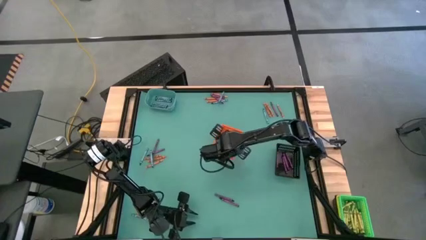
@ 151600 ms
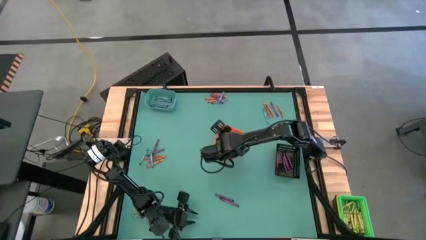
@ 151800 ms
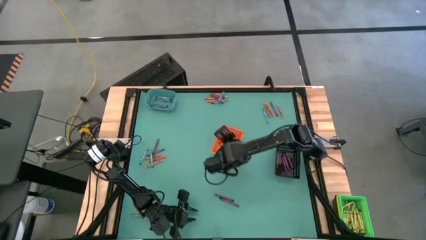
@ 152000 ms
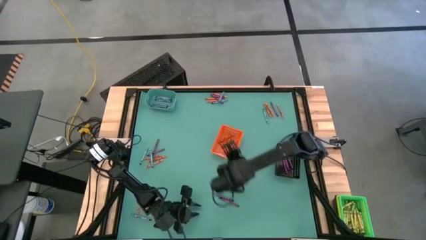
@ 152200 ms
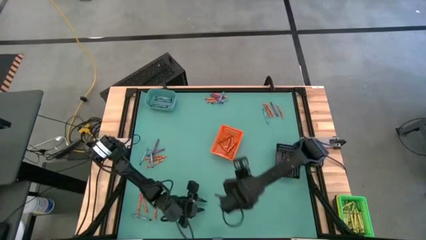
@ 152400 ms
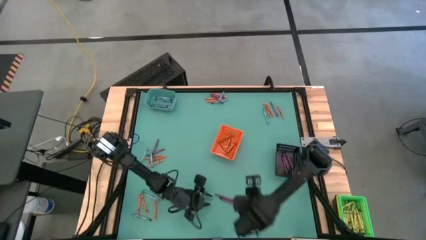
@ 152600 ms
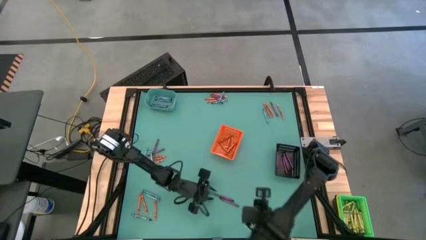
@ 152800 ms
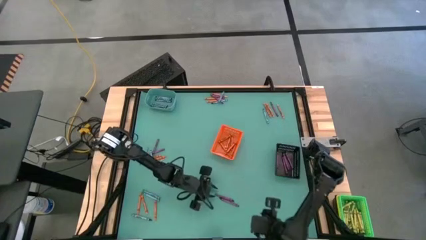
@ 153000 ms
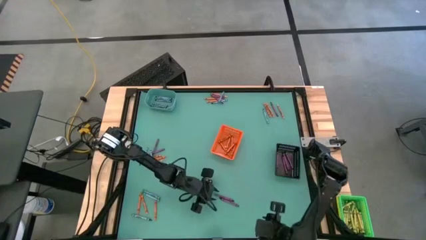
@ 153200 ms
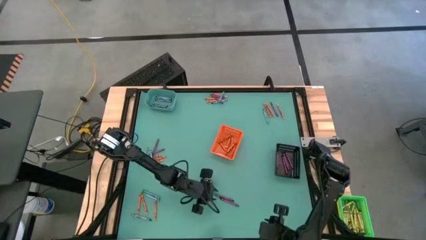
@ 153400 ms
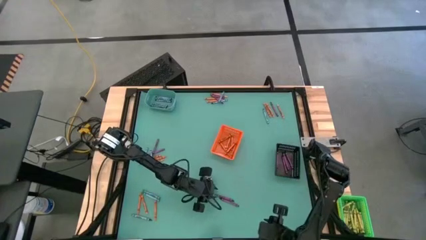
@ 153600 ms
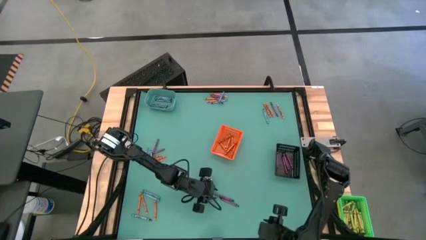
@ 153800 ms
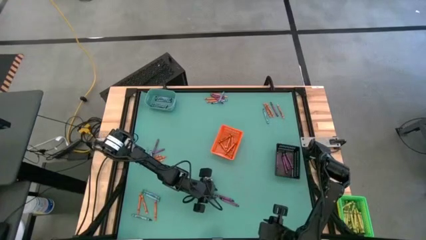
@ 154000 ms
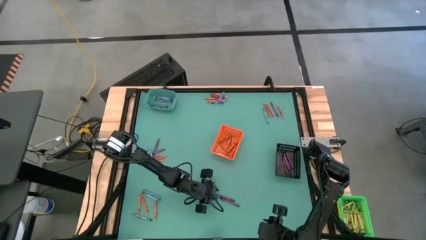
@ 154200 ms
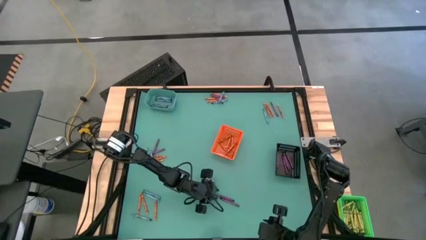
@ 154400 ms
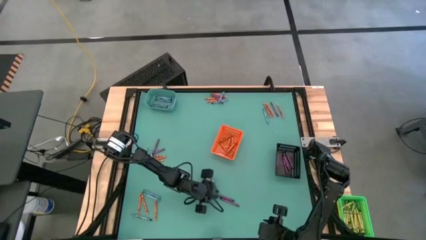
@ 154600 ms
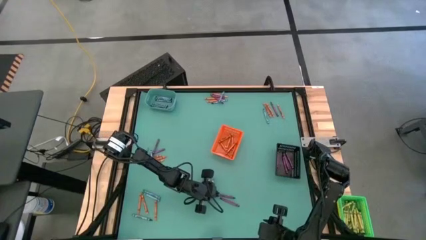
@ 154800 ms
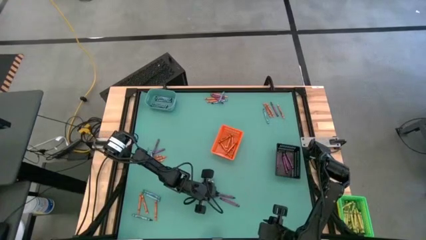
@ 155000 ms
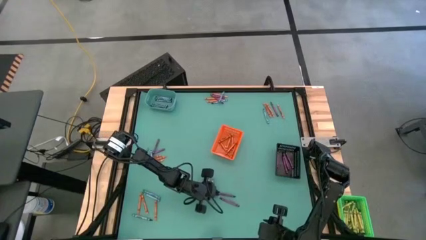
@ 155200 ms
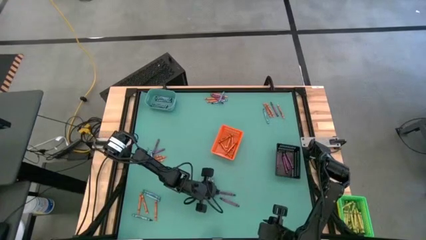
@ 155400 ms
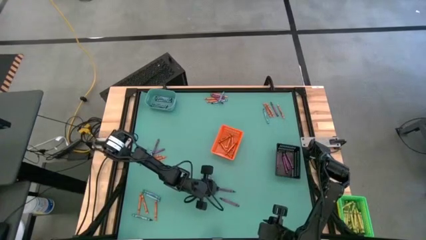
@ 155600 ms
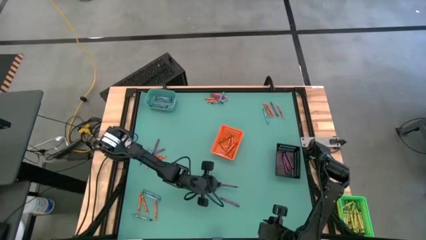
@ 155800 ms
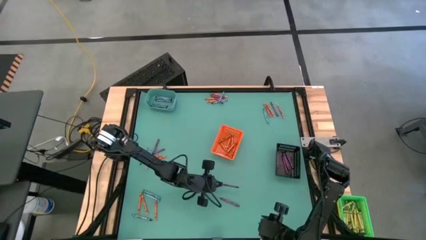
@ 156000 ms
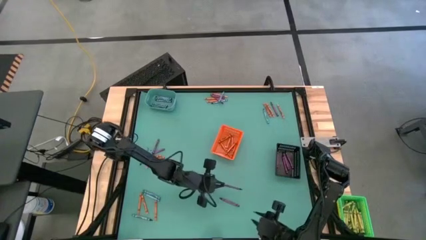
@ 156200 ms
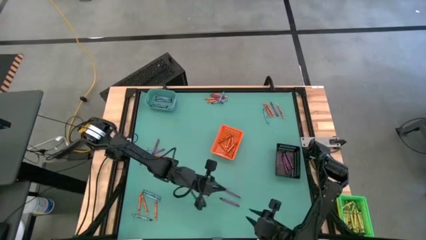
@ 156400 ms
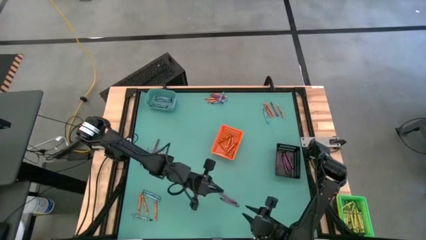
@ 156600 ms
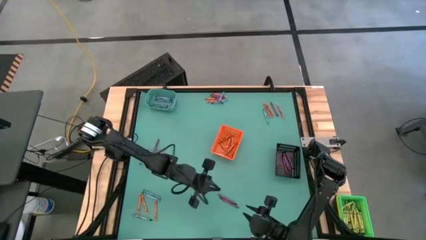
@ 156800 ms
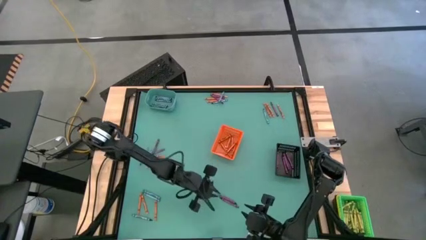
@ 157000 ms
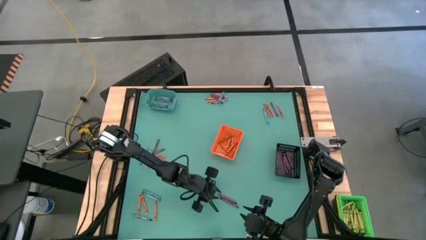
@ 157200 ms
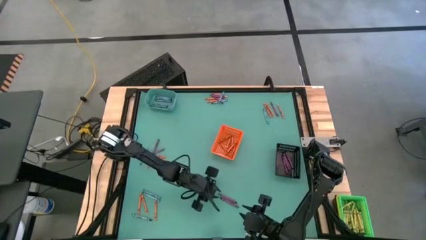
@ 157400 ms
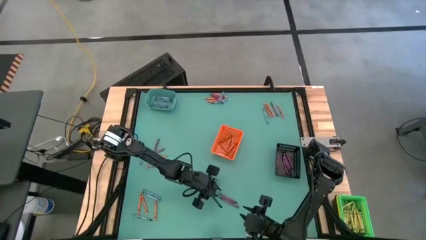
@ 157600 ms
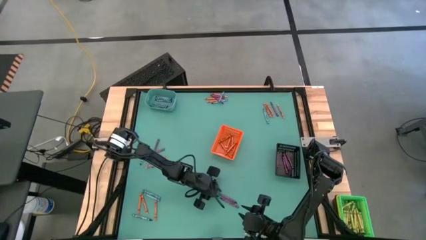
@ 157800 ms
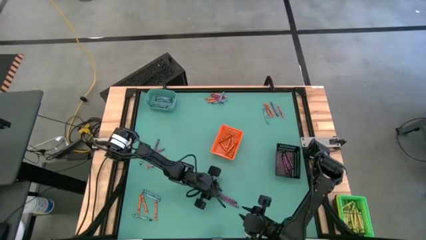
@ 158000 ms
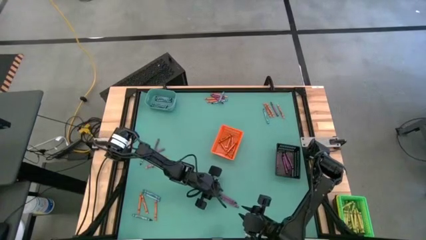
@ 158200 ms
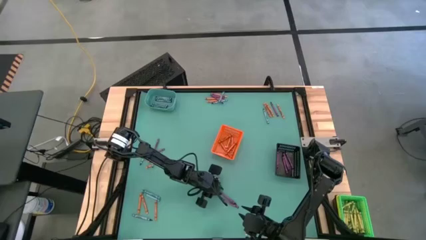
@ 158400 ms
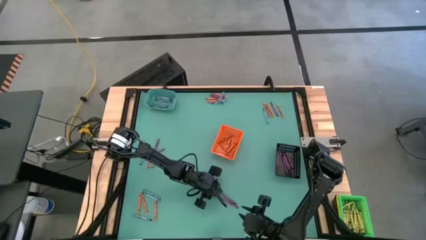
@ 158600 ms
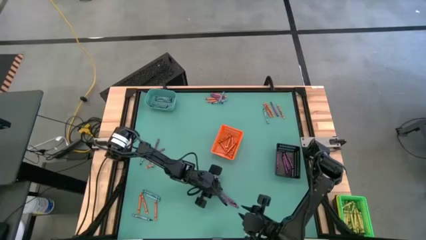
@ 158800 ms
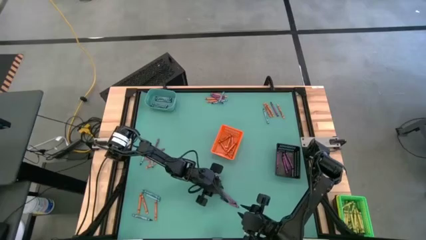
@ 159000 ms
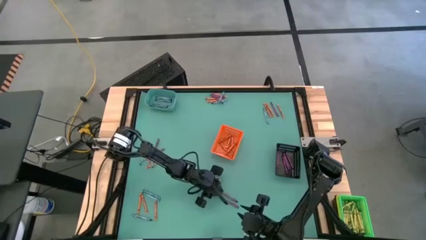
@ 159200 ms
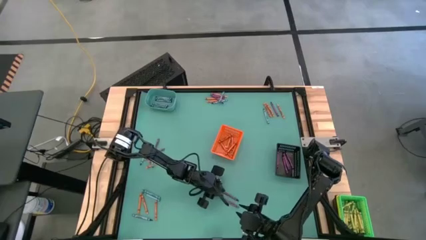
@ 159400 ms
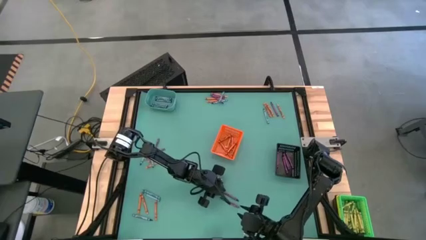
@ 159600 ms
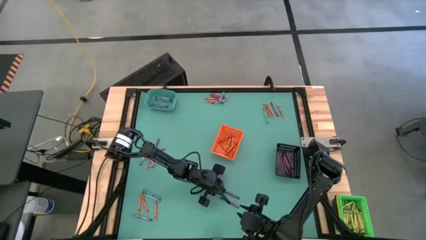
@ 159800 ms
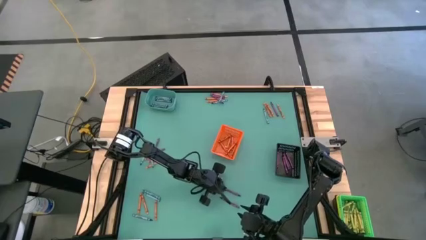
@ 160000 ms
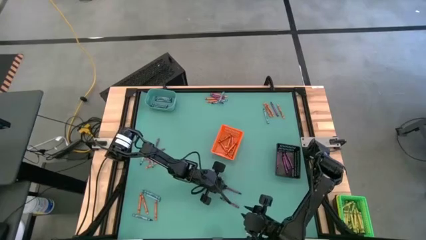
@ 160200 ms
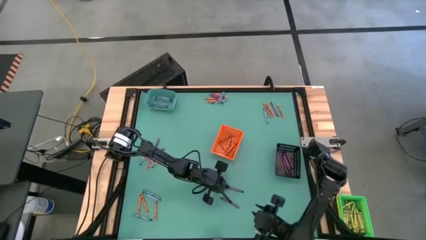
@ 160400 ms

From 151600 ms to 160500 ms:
Task: Sort crayons
Put the violet crayon into black bin

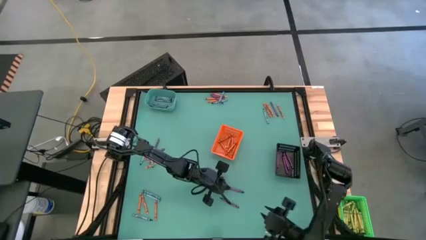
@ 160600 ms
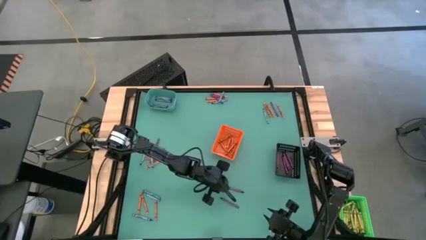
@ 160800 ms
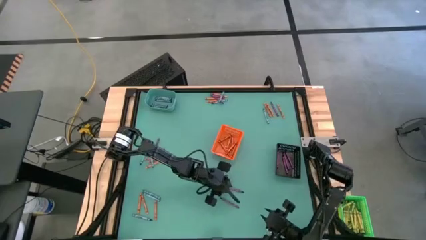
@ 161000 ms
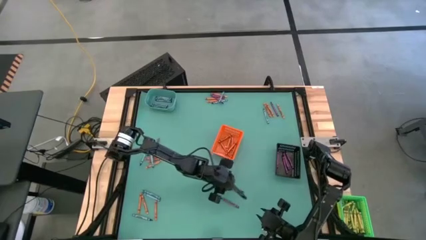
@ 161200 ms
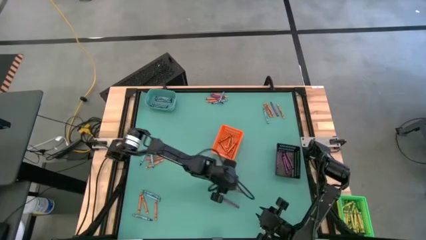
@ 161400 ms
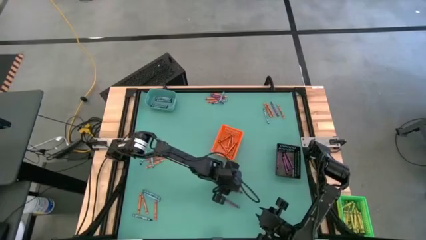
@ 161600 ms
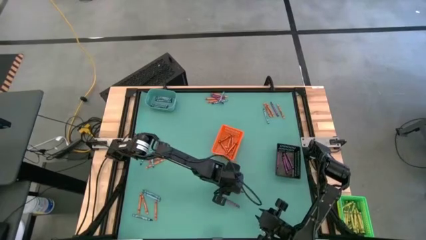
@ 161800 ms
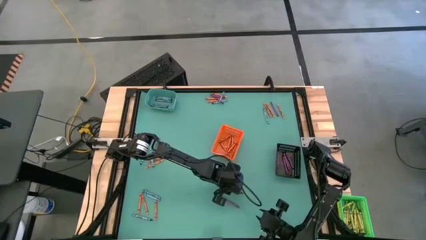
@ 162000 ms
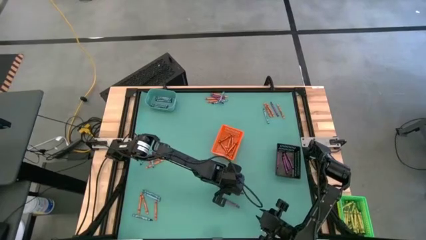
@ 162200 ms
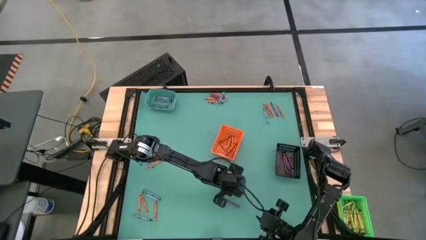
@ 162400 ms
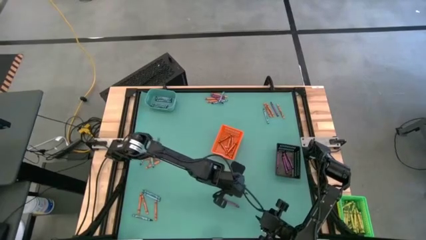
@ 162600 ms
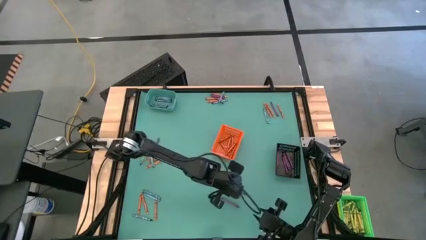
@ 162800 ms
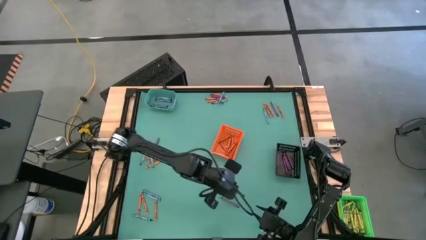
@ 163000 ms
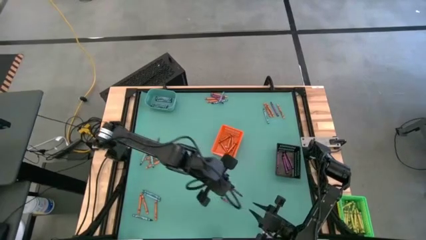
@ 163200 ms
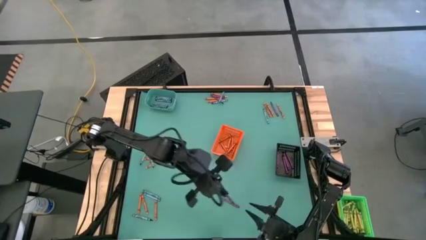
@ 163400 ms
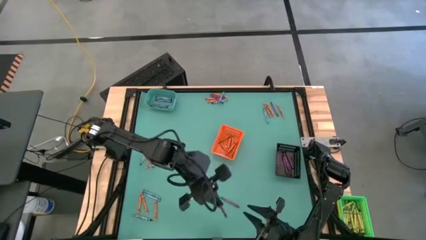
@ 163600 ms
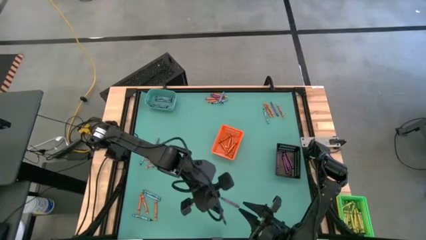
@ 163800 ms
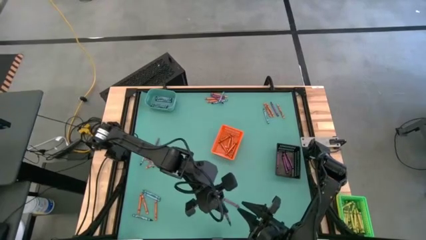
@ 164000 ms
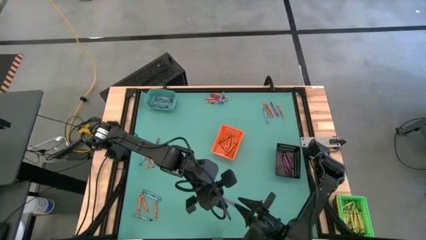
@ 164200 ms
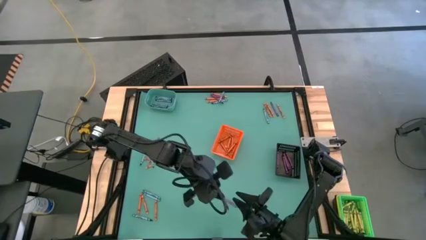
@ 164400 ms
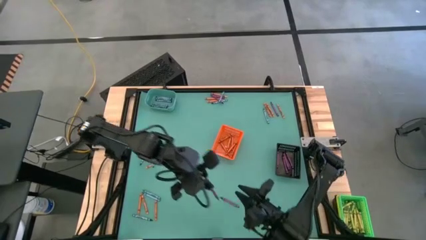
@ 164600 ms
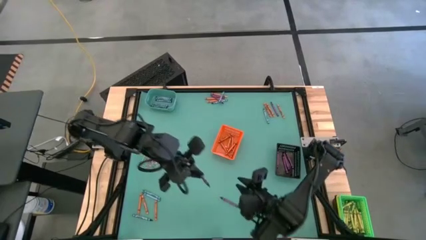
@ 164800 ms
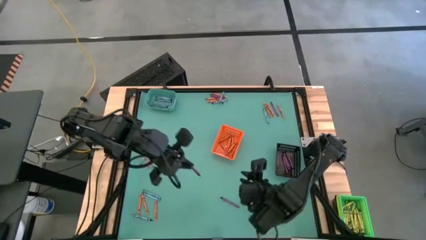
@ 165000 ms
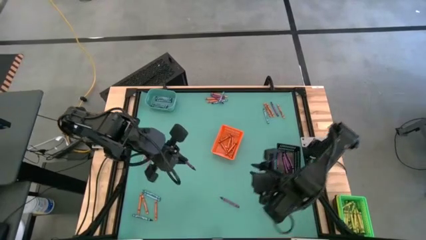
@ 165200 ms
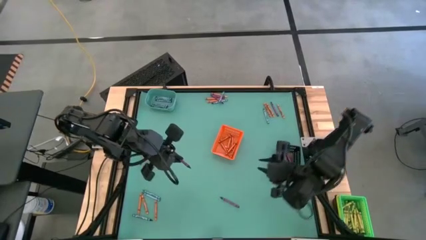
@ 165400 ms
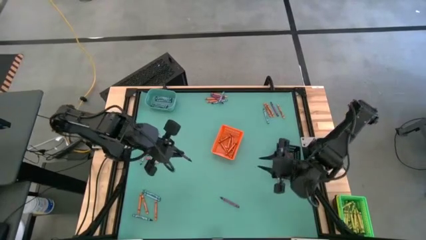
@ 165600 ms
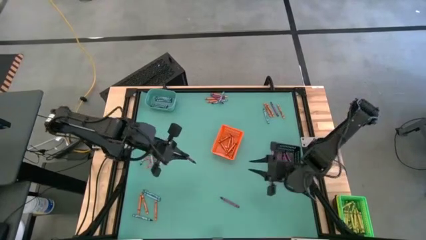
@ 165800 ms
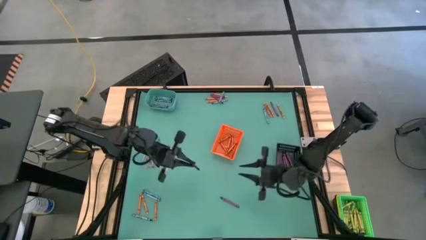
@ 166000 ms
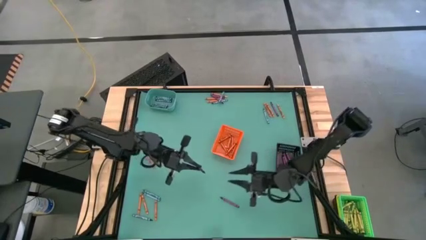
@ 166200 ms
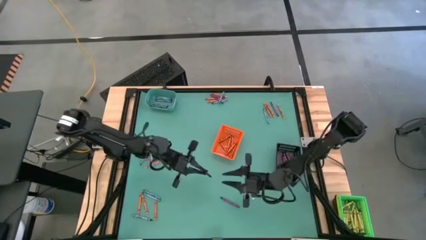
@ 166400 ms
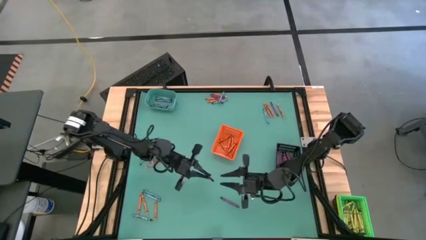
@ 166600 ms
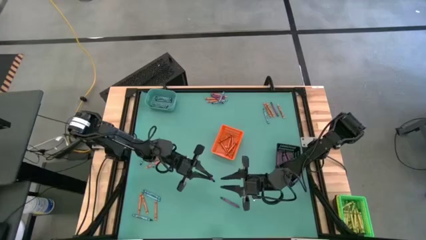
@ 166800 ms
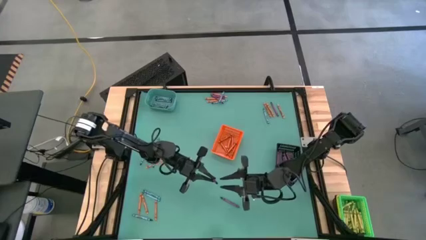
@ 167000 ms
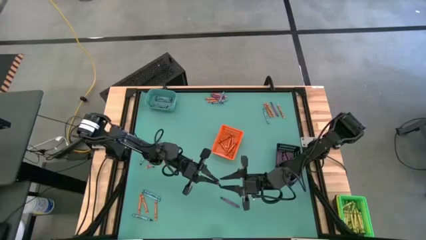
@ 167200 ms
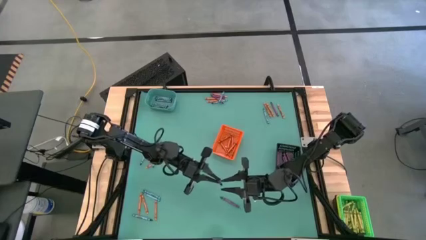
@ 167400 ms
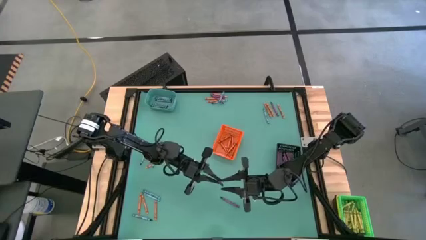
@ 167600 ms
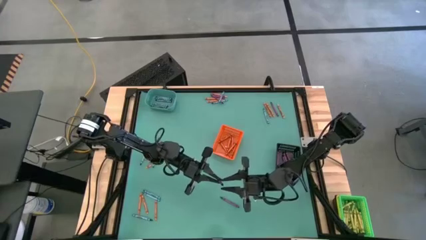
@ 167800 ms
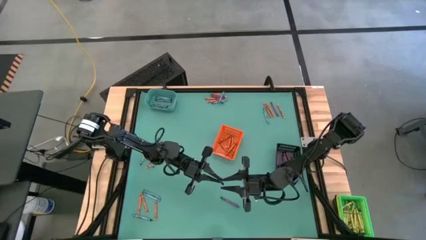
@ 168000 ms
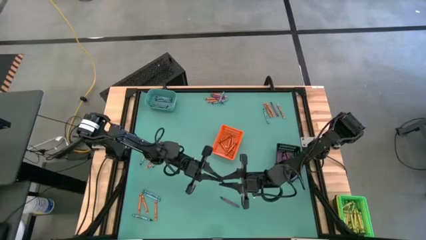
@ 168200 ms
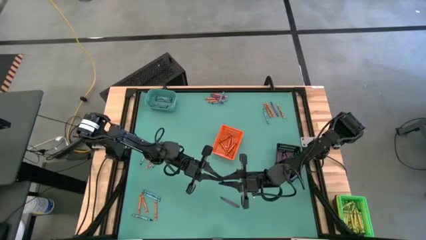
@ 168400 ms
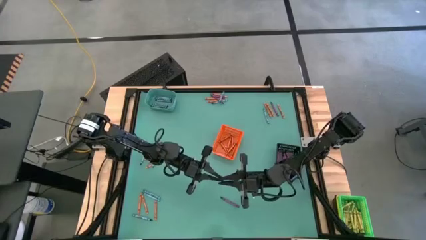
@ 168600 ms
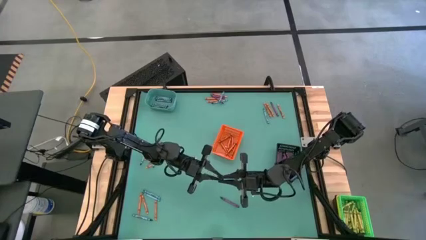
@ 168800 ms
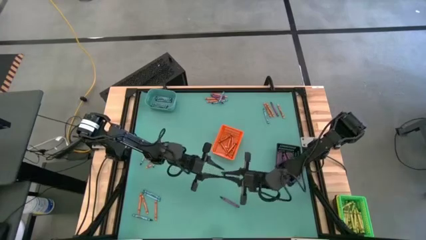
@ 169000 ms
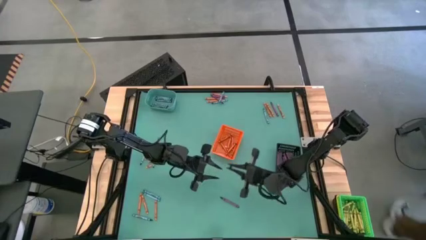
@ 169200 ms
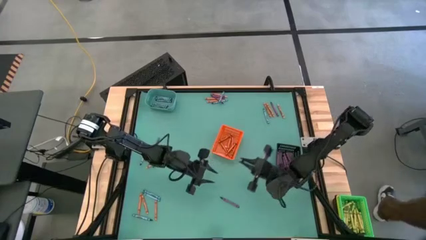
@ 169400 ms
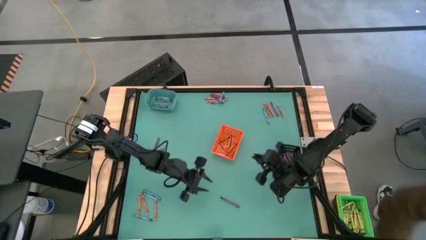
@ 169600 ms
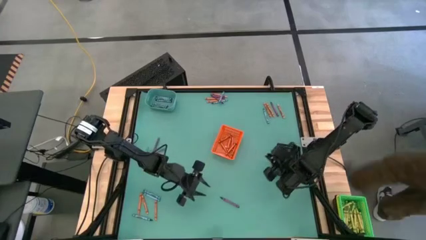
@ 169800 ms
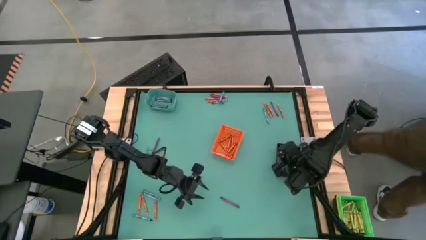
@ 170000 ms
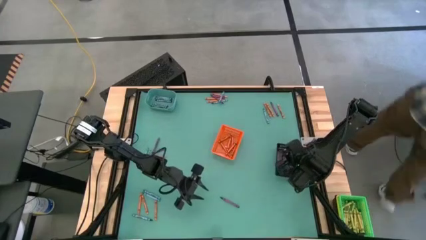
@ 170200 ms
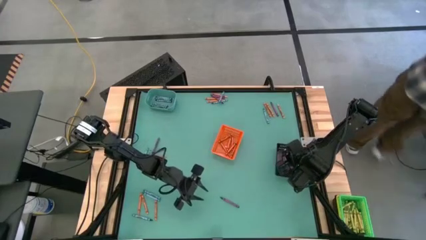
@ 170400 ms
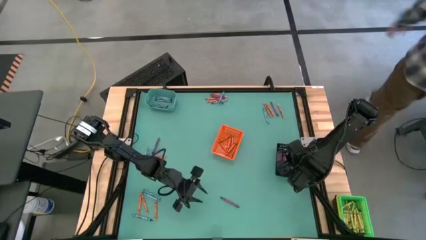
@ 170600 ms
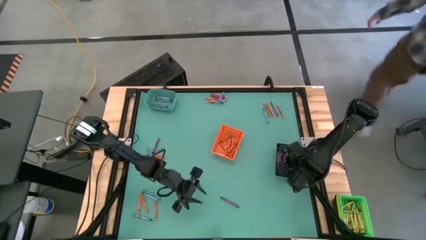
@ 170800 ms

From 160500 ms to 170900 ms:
Put the violet crayon into black bin
